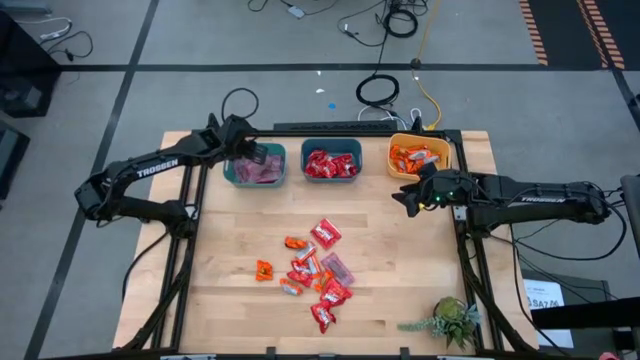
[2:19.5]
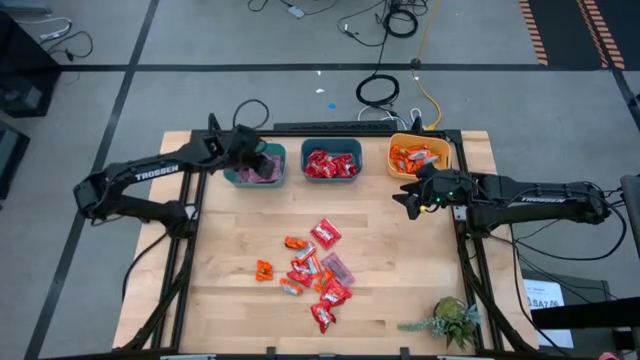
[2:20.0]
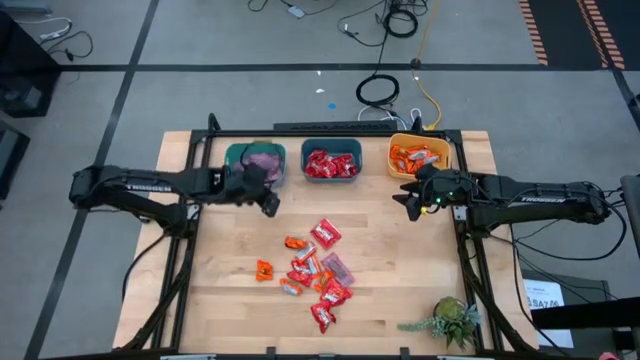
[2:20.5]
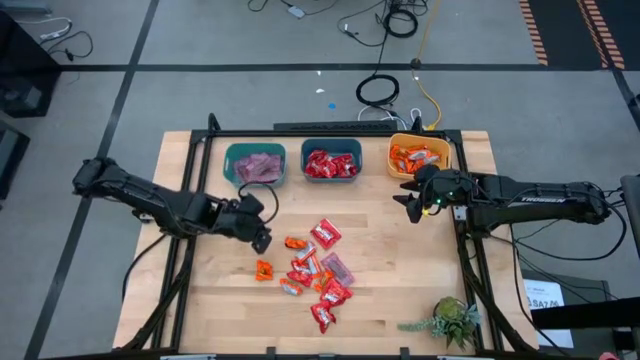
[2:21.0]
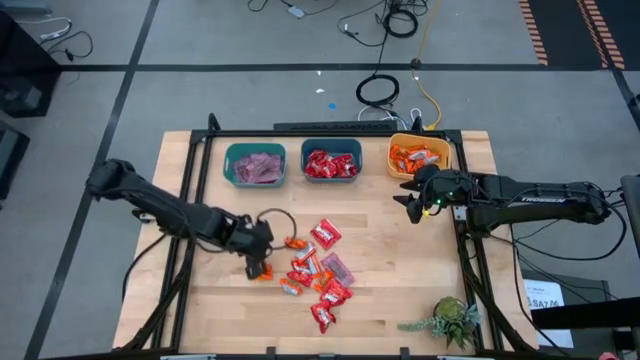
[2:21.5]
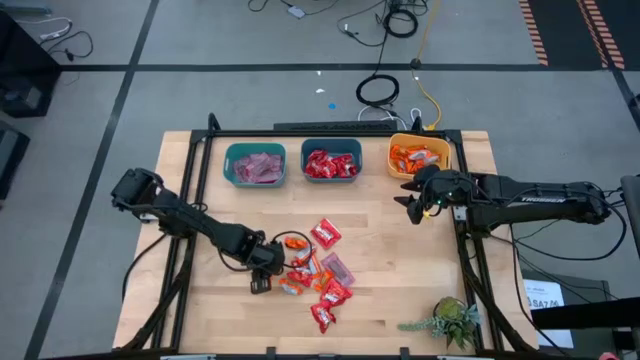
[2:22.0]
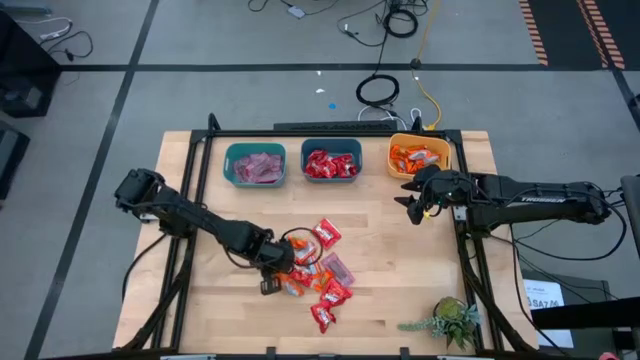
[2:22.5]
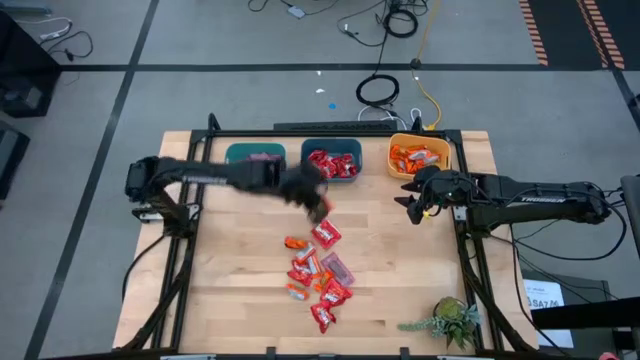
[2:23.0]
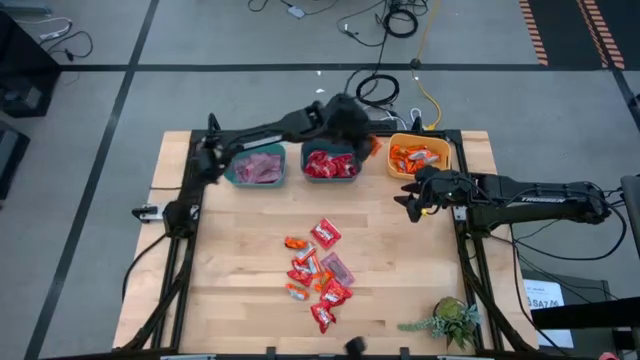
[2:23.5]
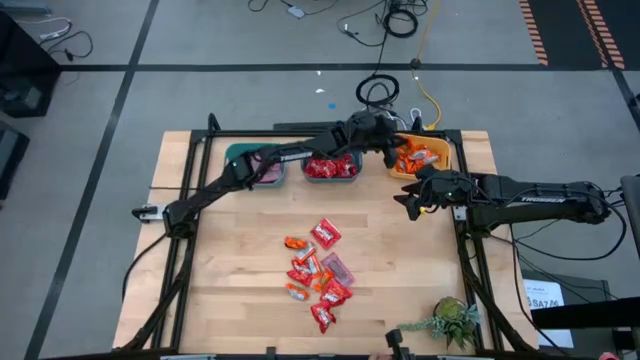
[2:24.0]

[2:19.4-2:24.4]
Task: Sort candy
Put the orange chocolate into the yellow bin

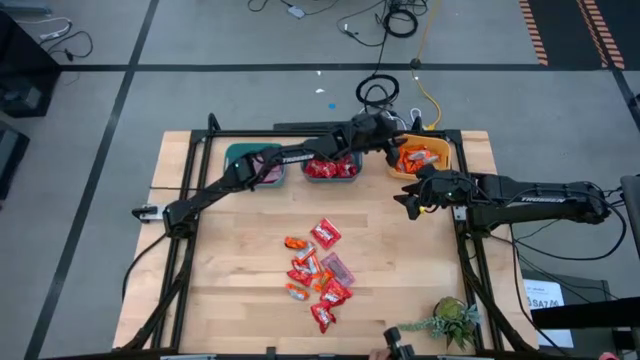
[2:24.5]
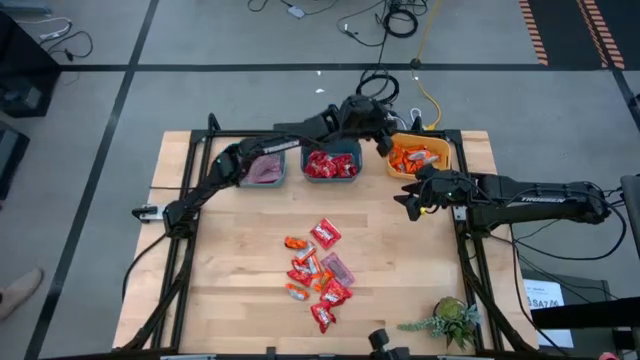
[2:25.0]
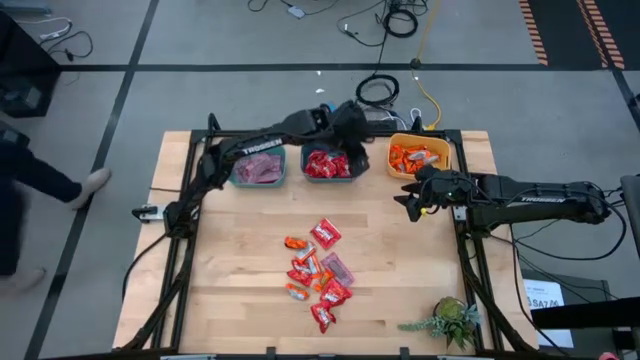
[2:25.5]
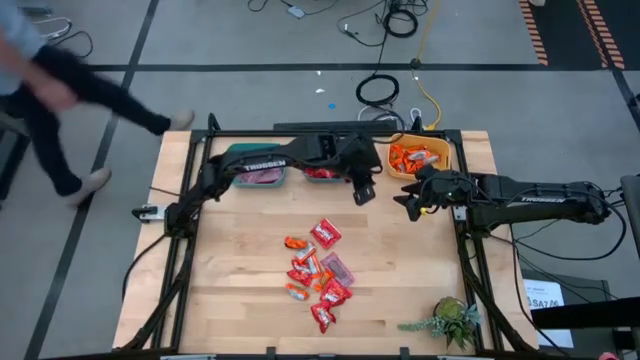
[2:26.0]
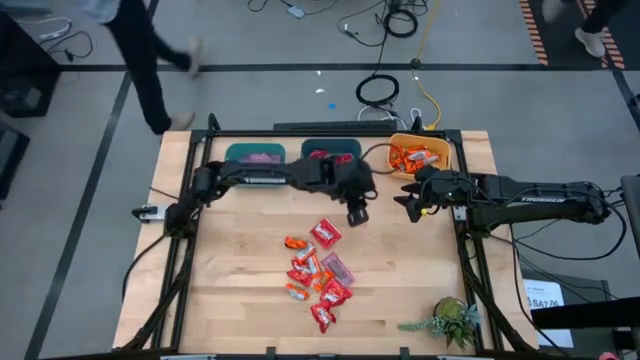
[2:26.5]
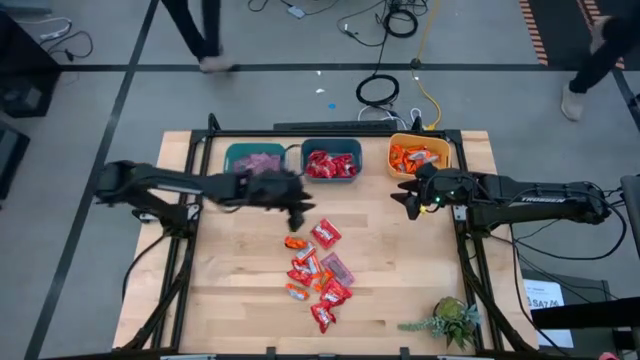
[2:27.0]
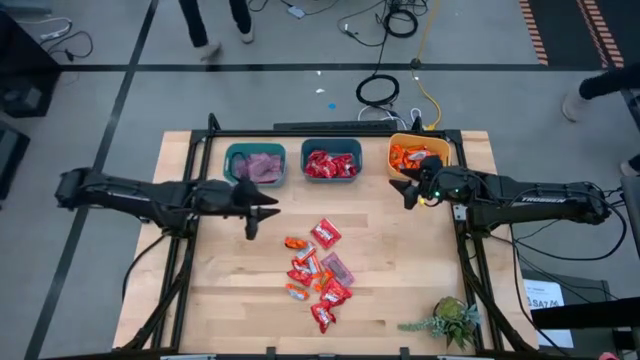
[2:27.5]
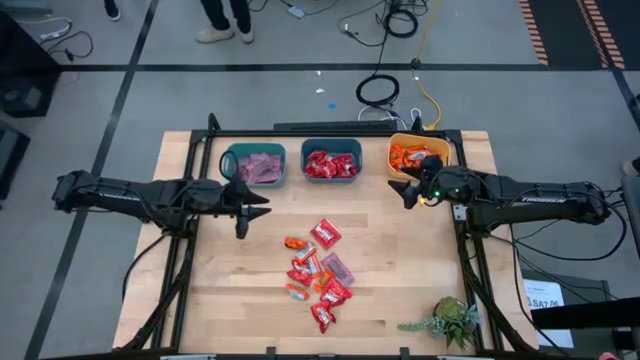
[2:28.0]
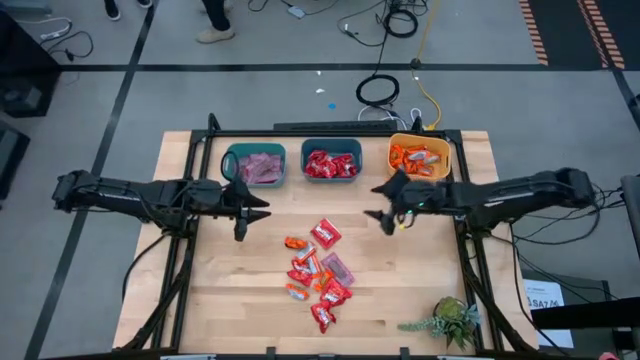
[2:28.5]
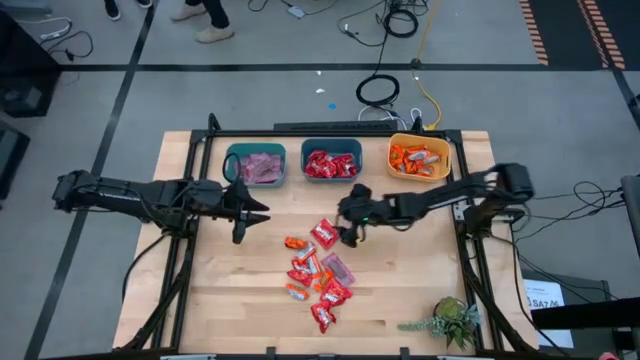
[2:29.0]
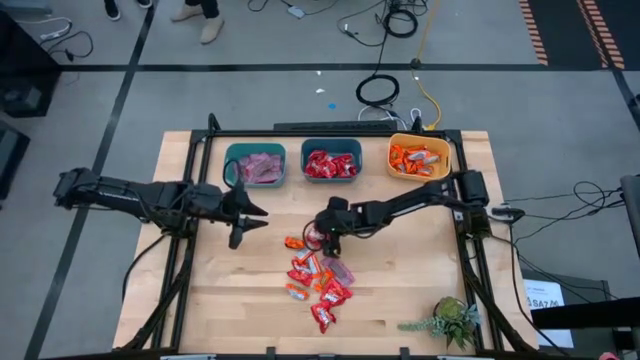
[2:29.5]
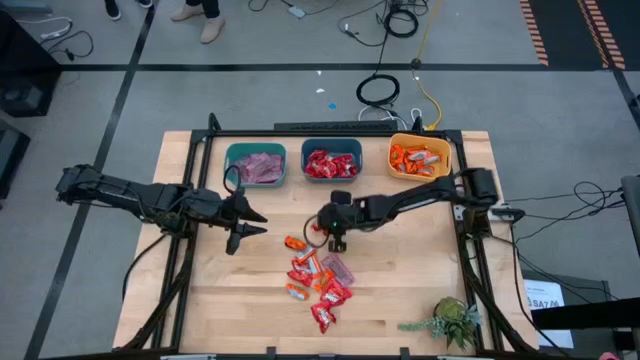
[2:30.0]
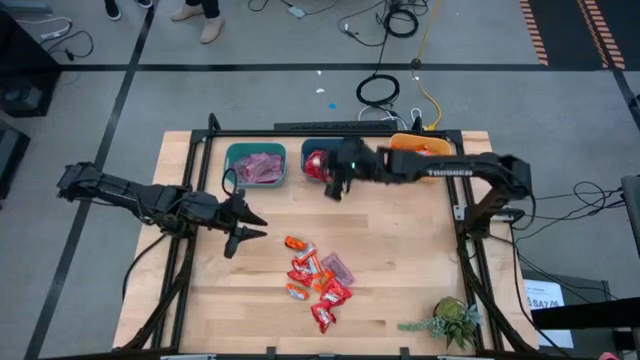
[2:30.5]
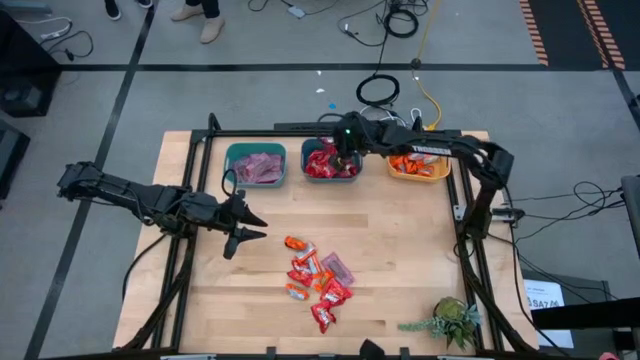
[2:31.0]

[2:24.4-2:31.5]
Put the red candy into the blue bin

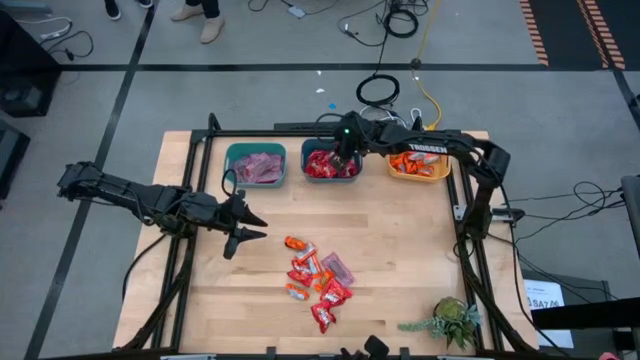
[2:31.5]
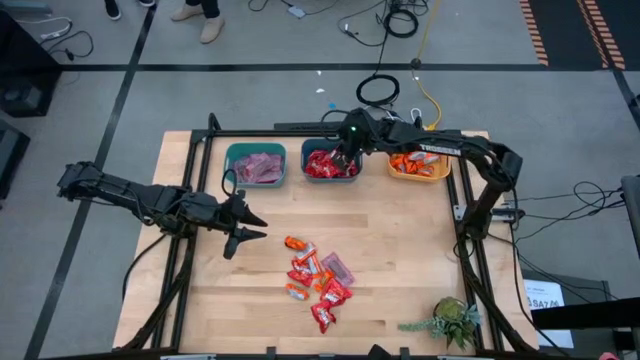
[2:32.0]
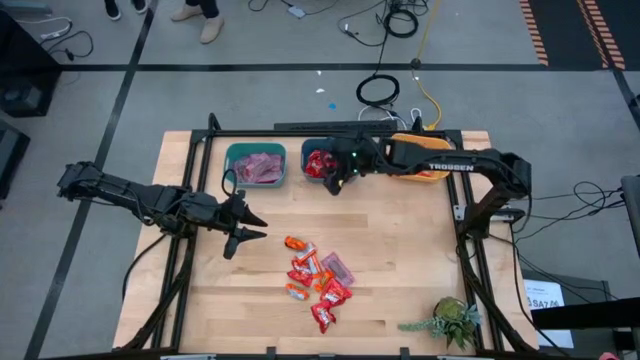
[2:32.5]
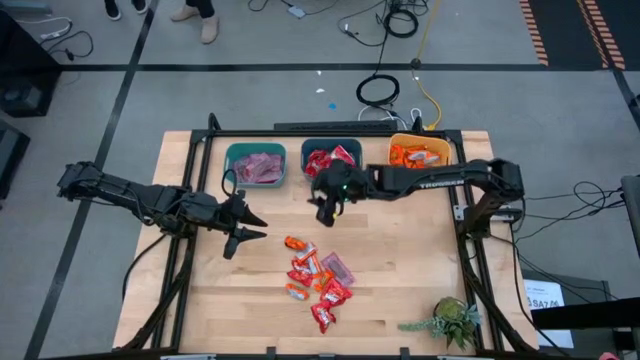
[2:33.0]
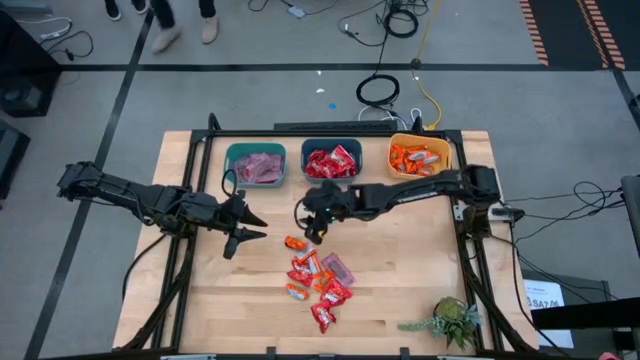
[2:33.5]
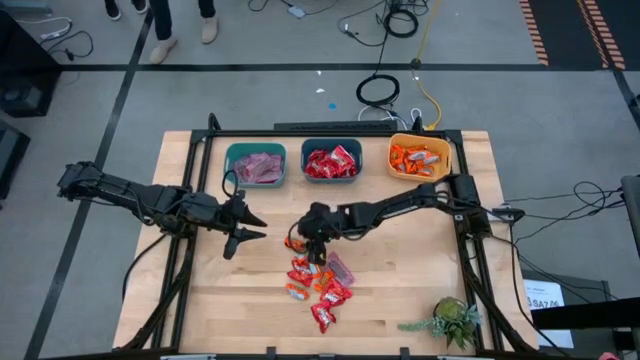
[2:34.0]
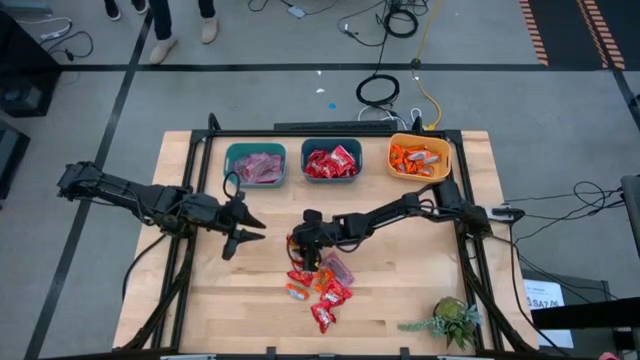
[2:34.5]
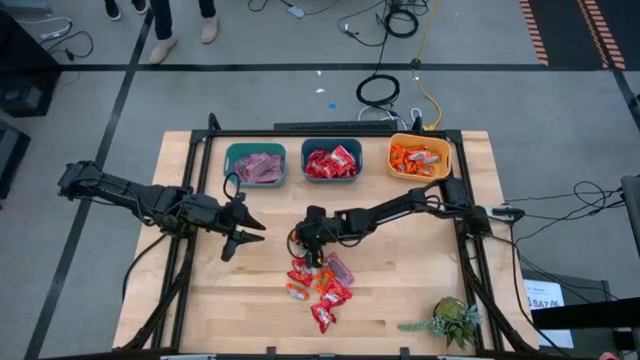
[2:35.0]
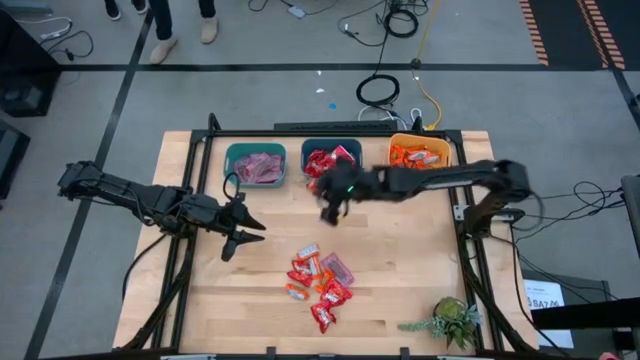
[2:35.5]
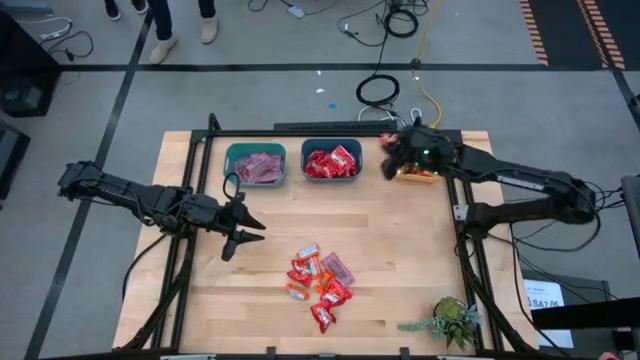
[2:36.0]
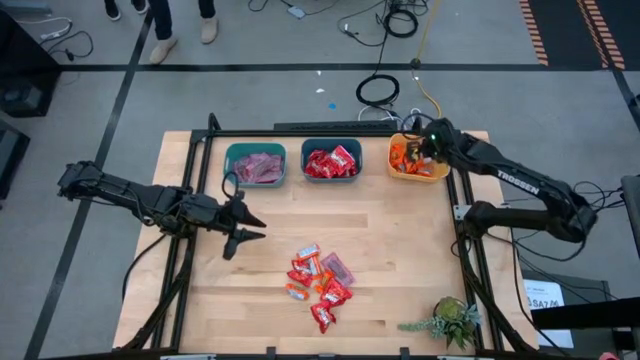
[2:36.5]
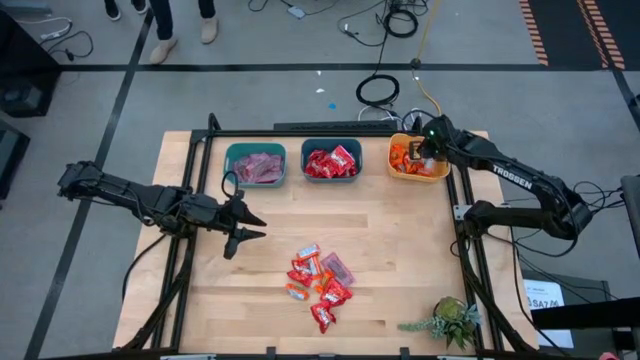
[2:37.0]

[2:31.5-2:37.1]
Put the orange chocolate into the yellow bin

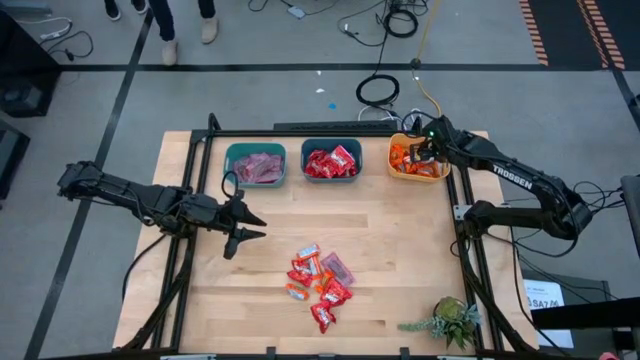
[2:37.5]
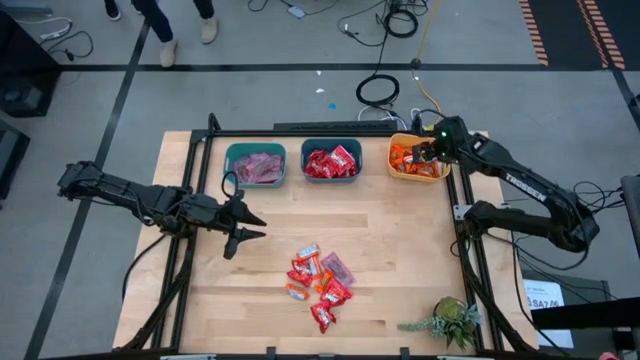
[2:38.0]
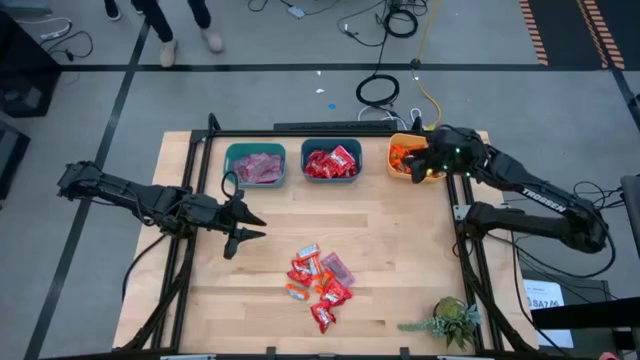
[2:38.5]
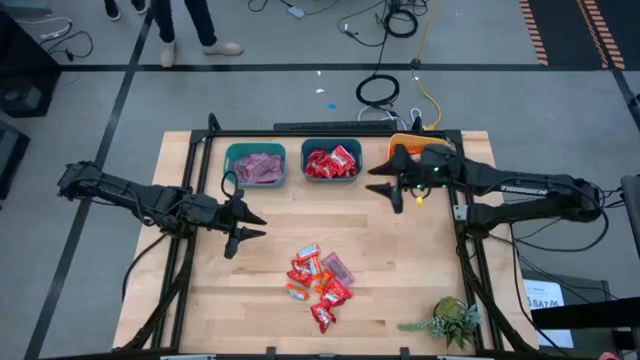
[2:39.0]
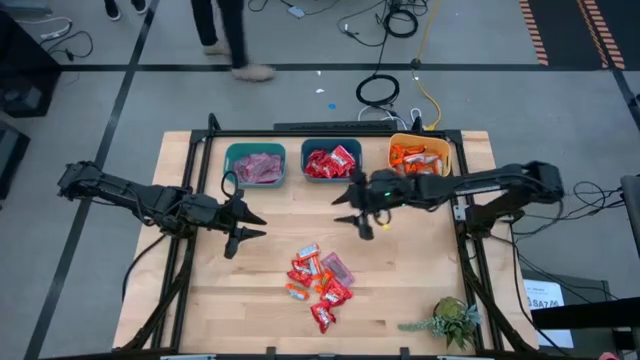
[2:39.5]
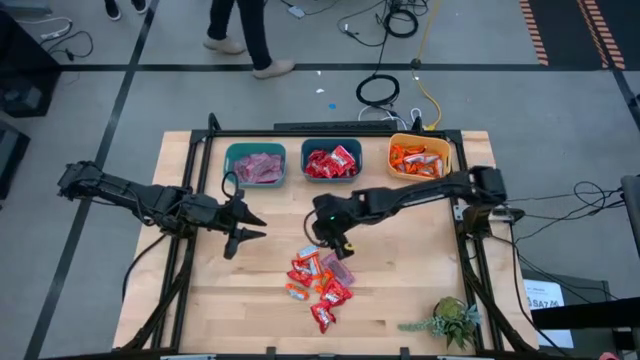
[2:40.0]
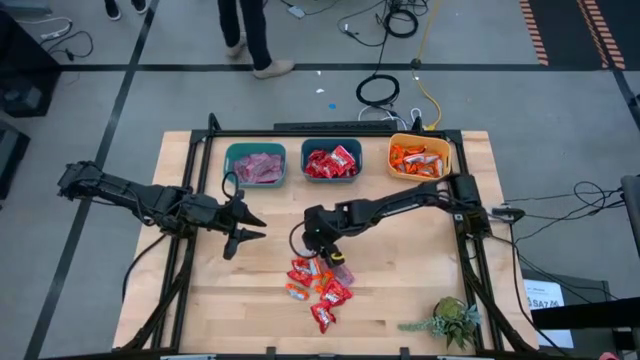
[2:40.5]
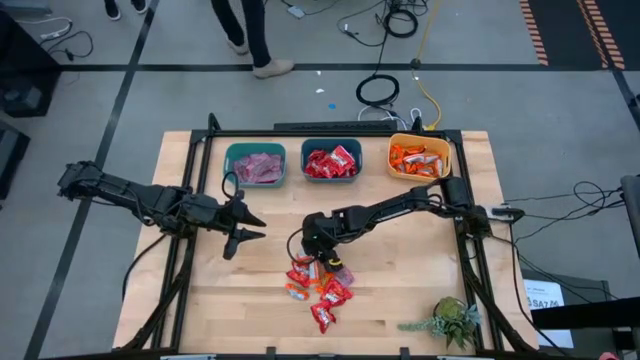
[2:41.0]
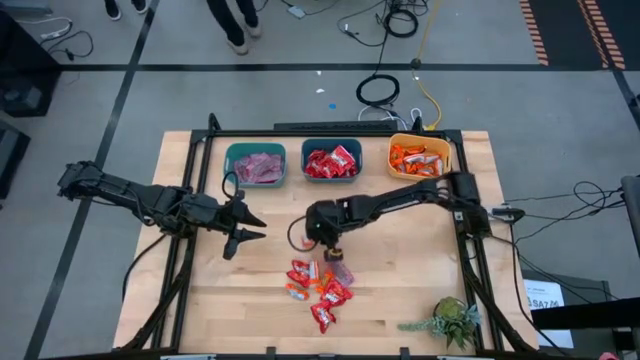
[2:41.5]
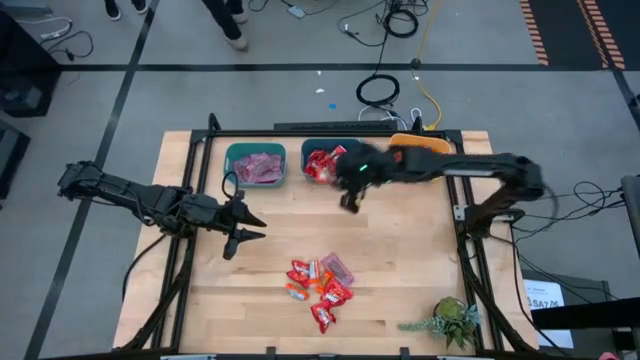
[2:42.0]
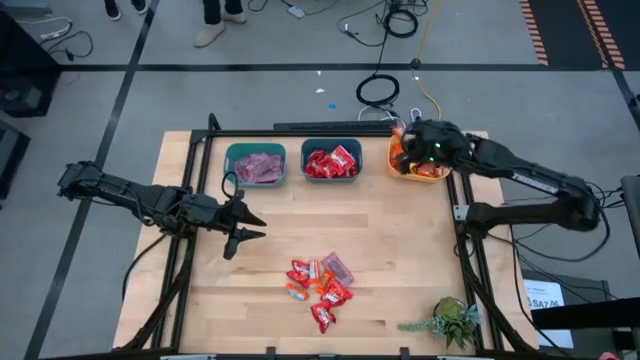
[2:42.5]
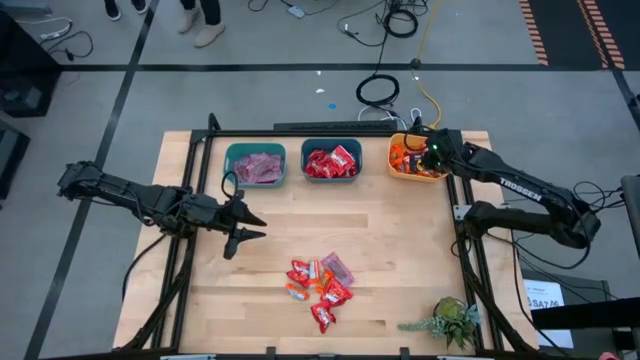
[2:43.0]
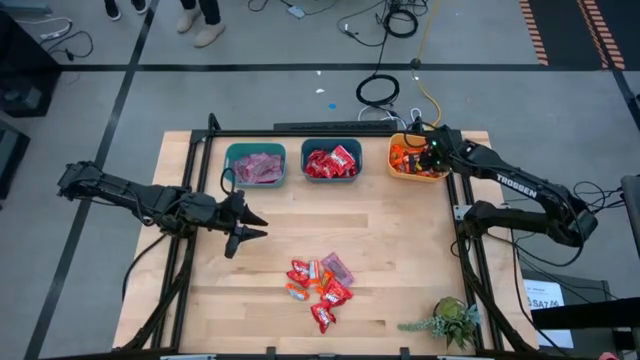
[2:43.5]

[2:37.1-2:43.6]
Put the orange chocolate into the yellow bin
